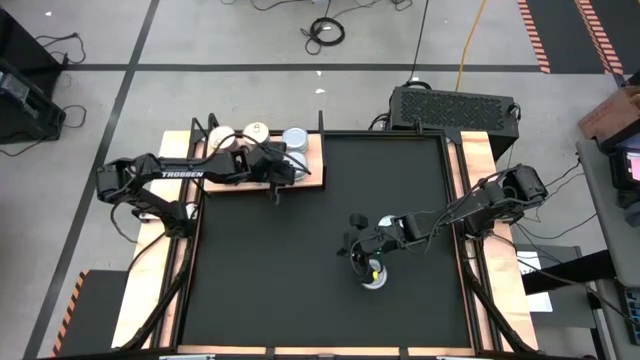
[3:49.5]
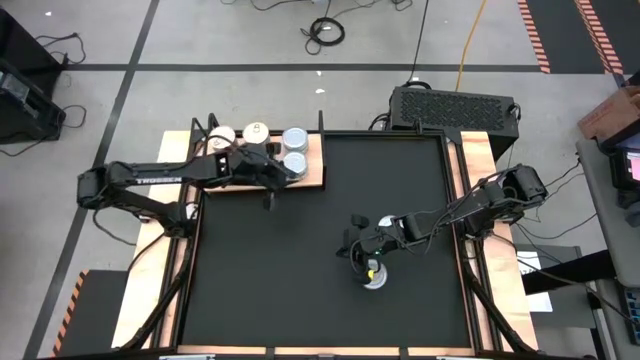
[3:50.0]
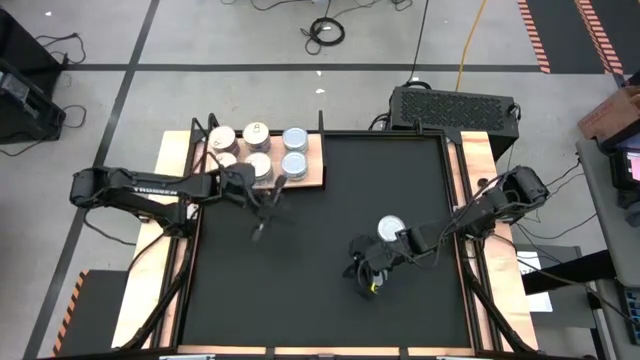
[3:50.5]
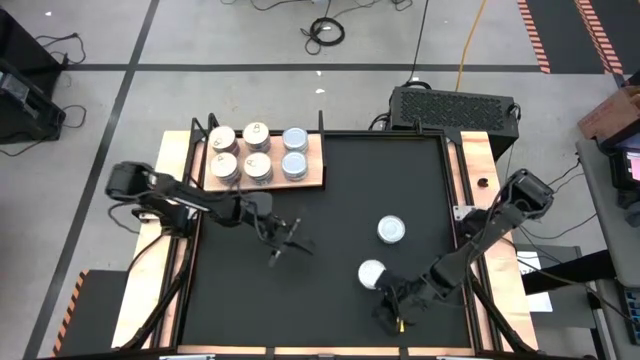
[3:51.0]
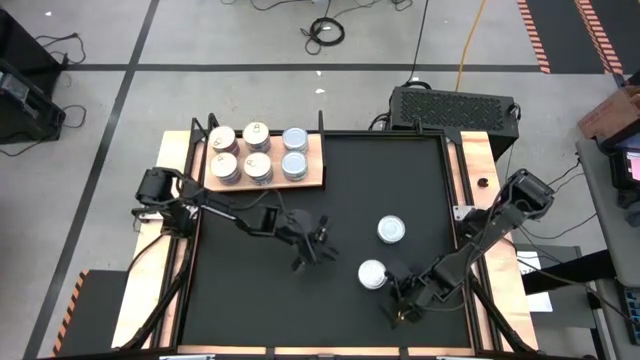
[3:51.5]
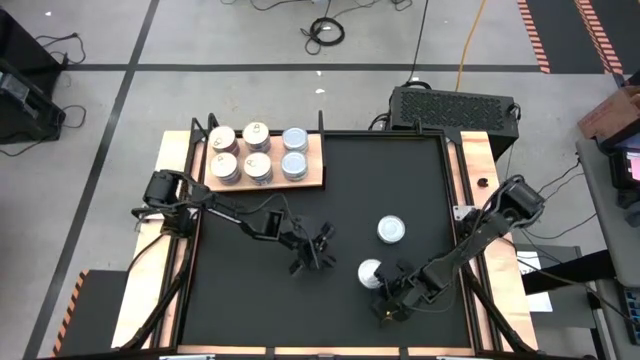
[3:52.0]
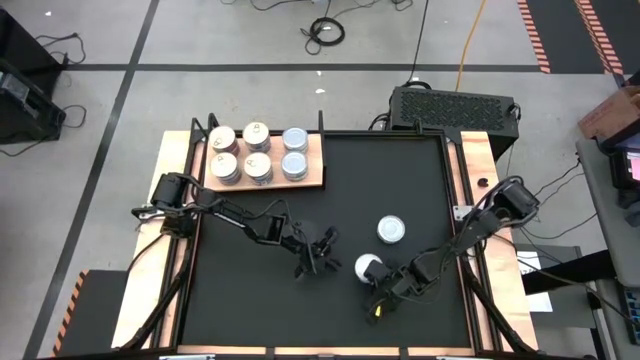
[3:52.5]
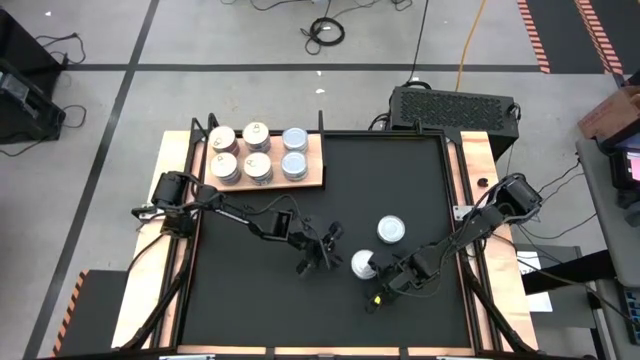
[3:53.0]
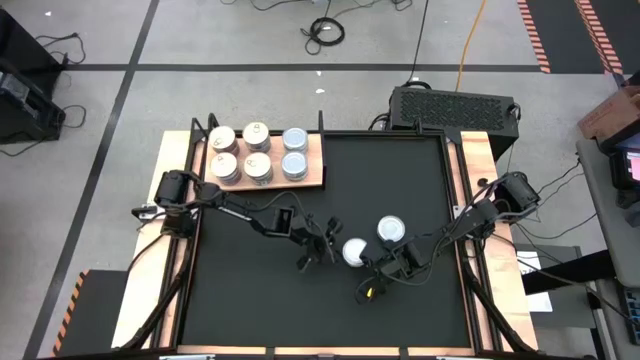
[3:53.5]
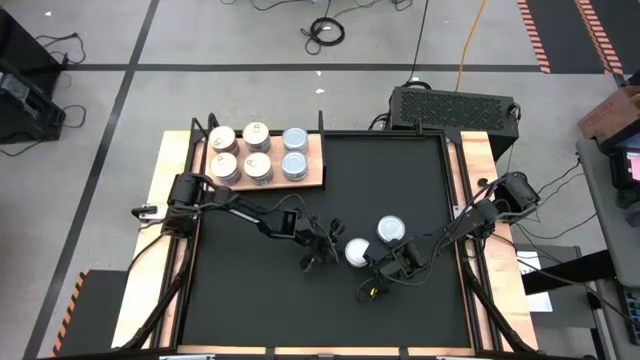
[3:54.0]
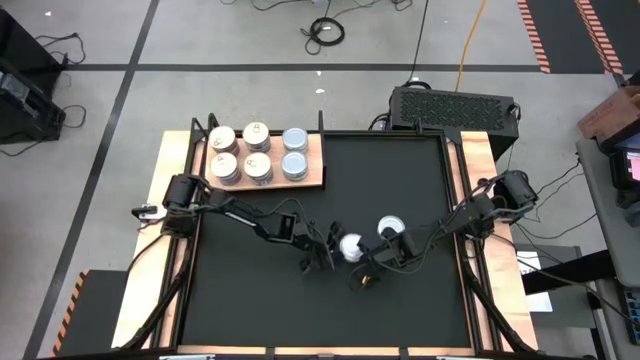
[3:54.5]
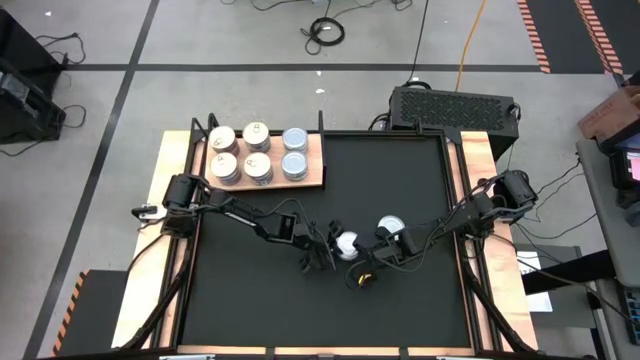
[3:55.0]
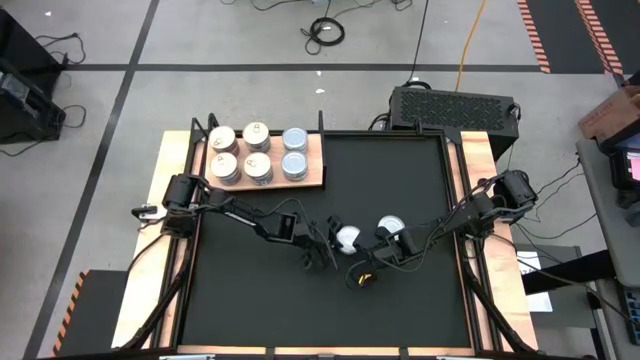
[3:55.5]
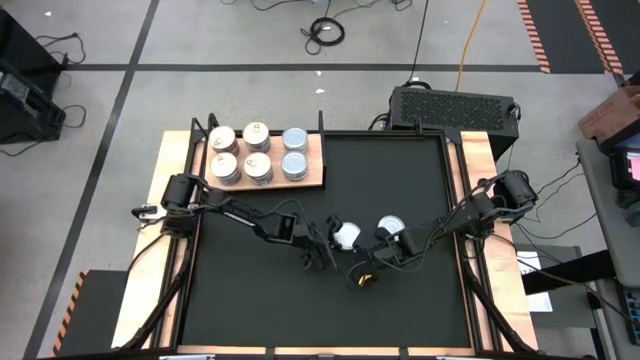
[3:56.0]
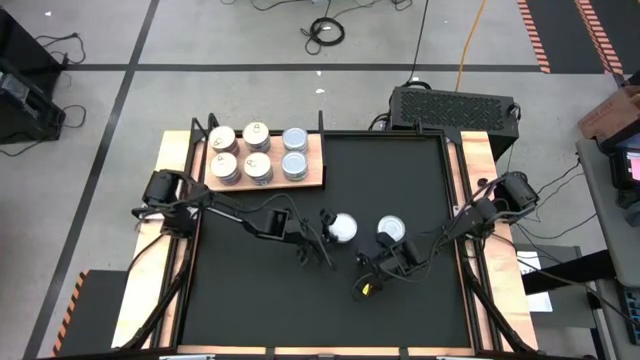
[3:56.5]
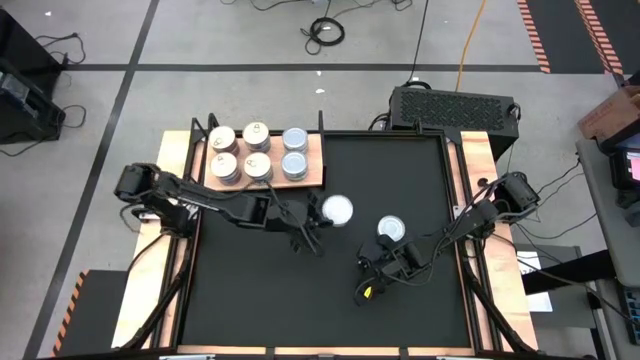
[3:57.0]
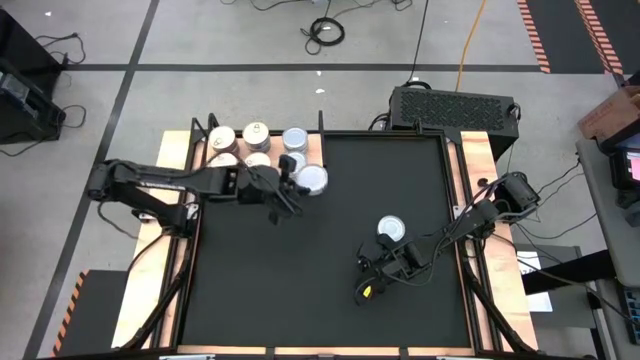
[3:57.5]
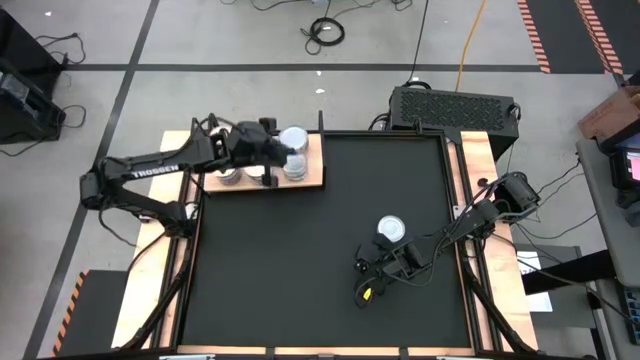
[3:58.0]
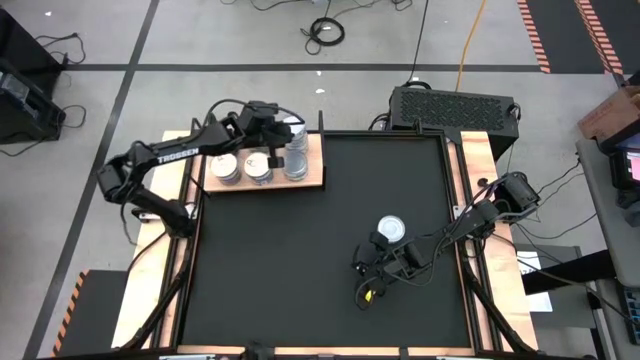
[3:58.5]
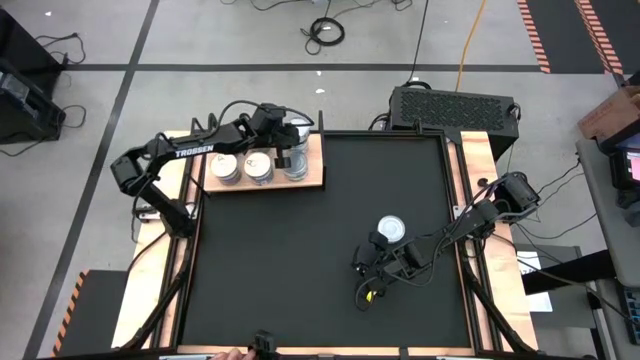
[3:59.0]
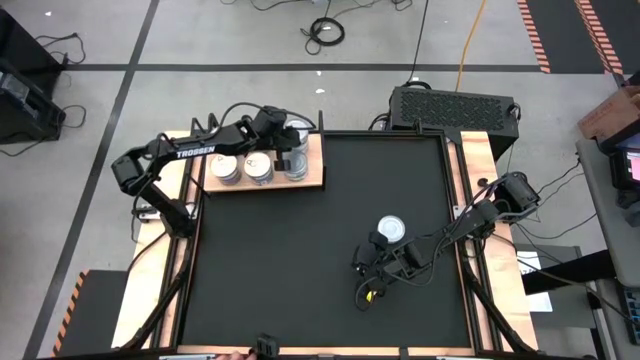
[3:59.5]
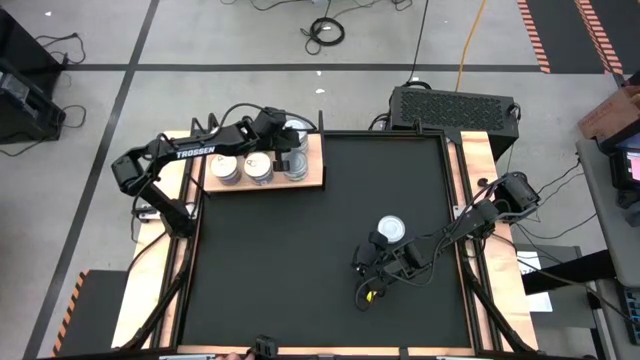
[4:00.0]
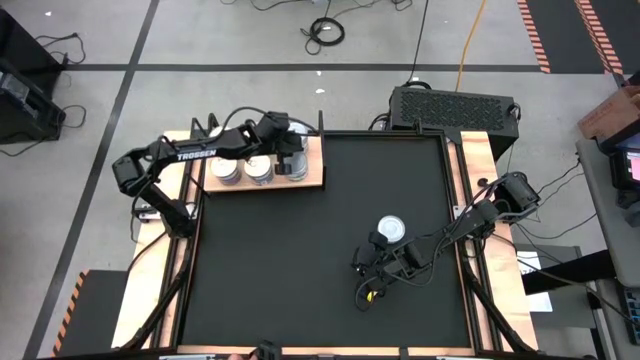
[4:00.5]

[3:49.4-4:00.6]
Task: Stack canned seafood by type on shelf
Stack the bottom green tuna can on the top green tuna can on the shelf

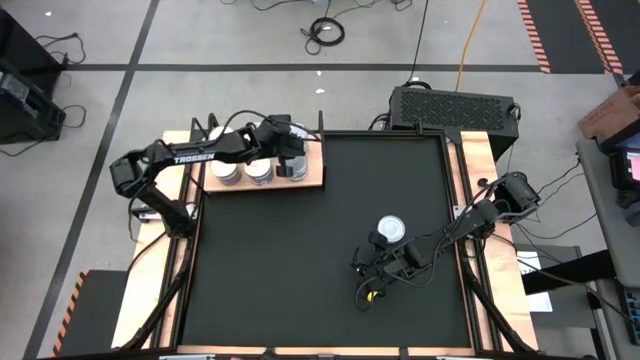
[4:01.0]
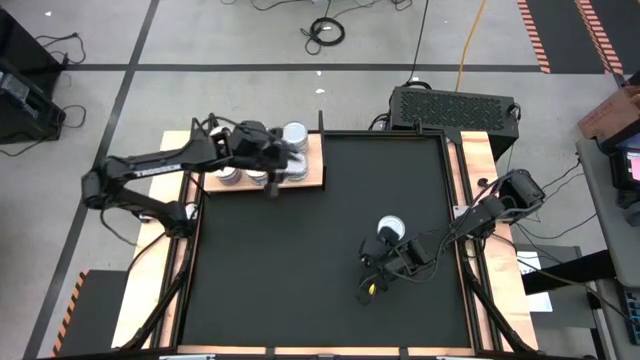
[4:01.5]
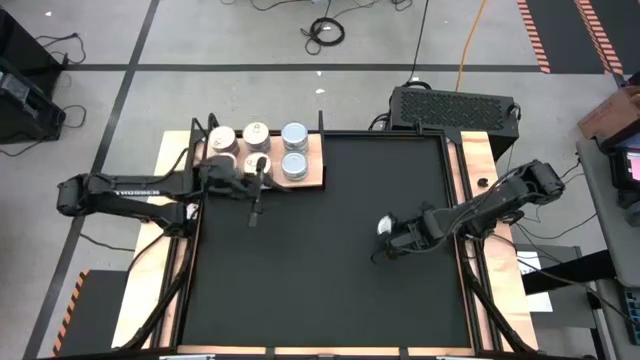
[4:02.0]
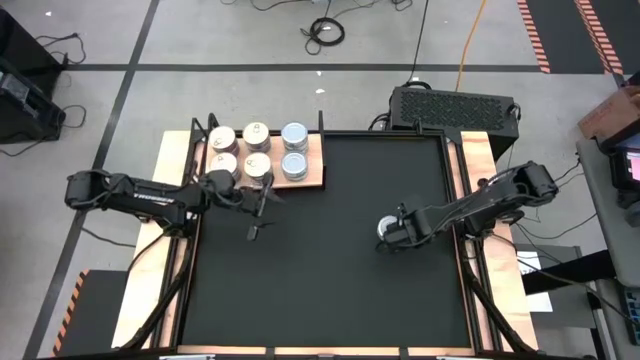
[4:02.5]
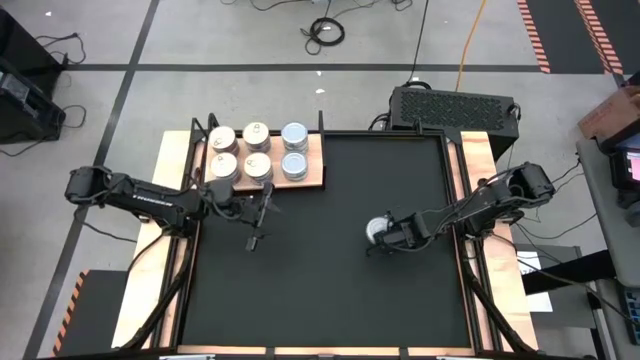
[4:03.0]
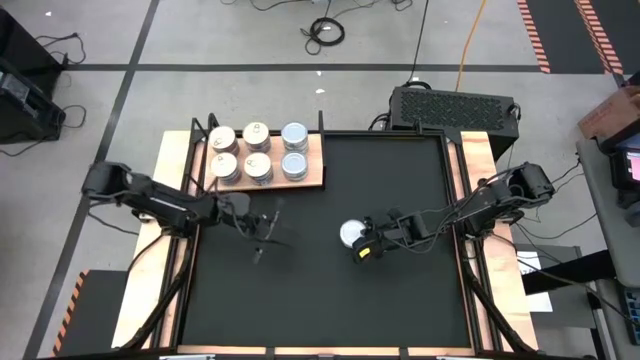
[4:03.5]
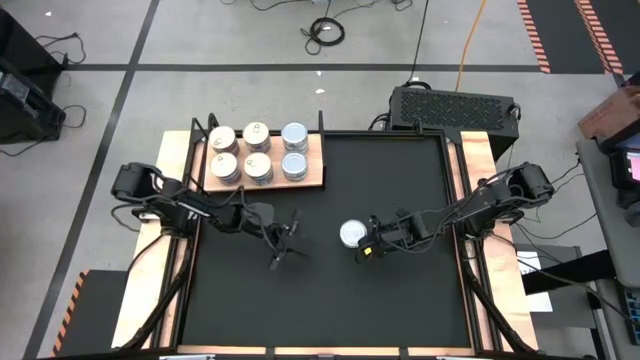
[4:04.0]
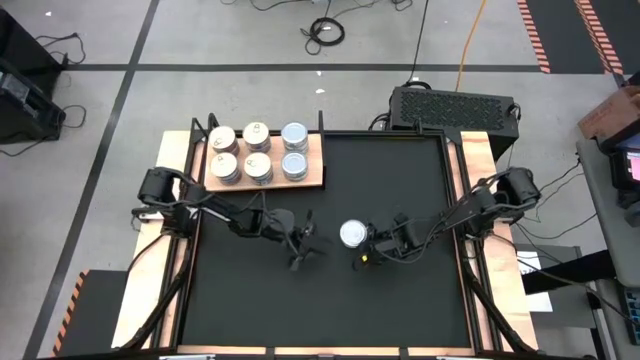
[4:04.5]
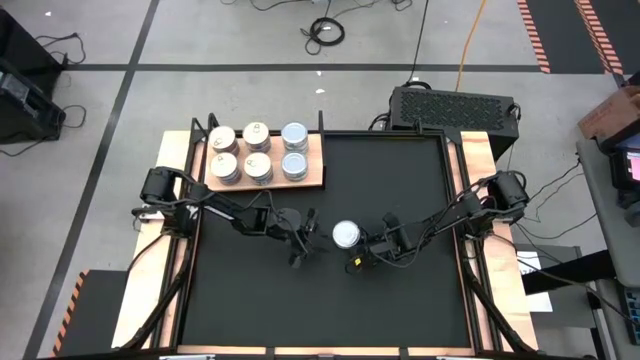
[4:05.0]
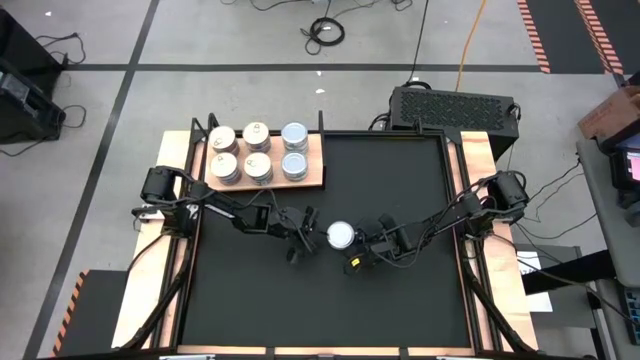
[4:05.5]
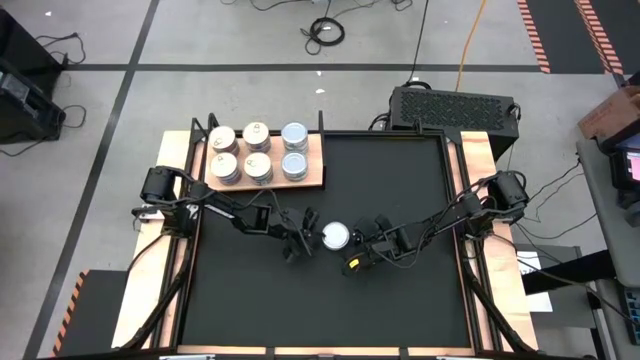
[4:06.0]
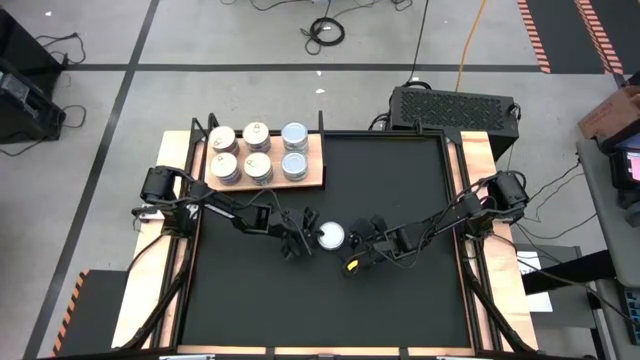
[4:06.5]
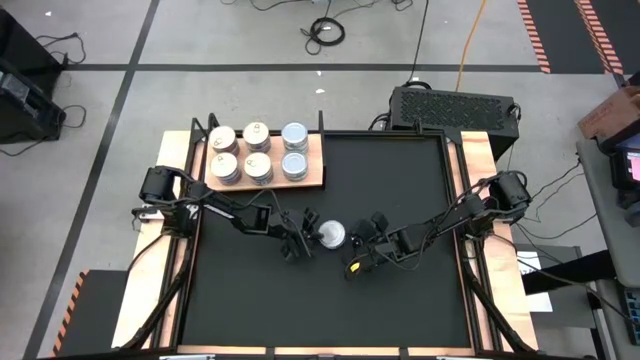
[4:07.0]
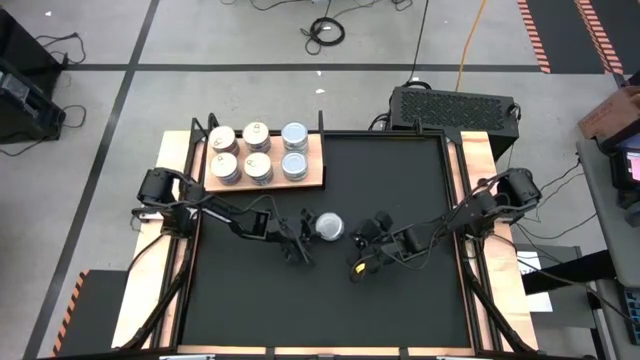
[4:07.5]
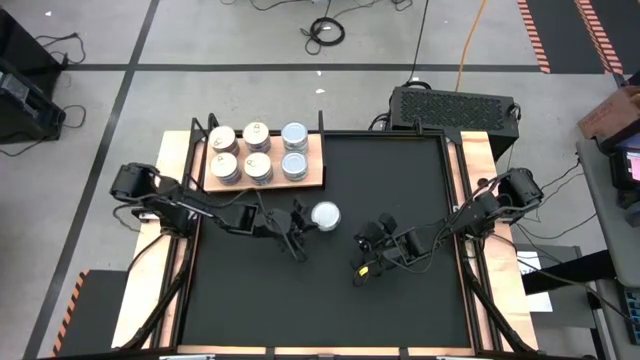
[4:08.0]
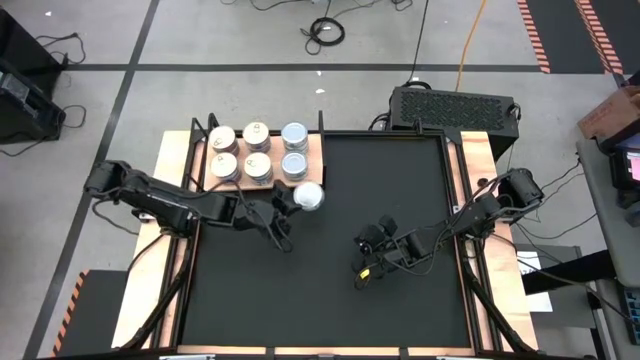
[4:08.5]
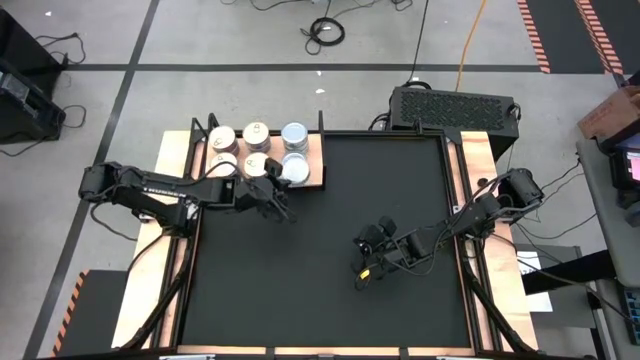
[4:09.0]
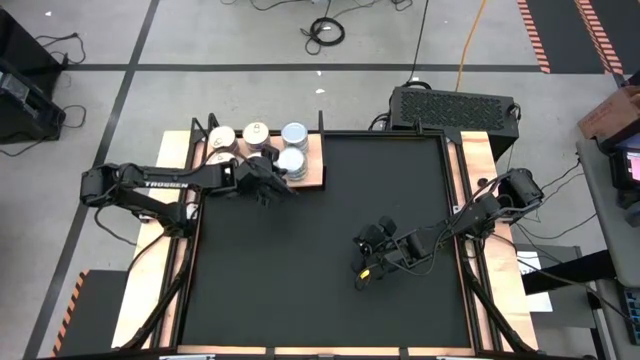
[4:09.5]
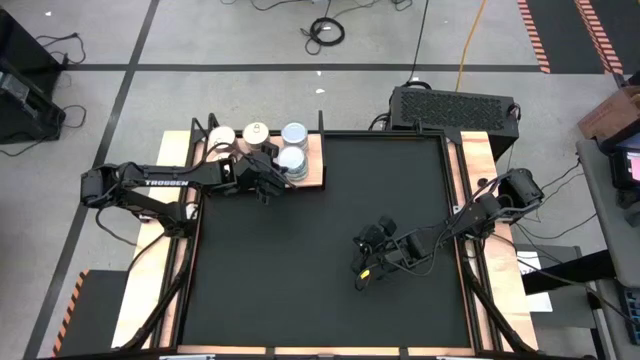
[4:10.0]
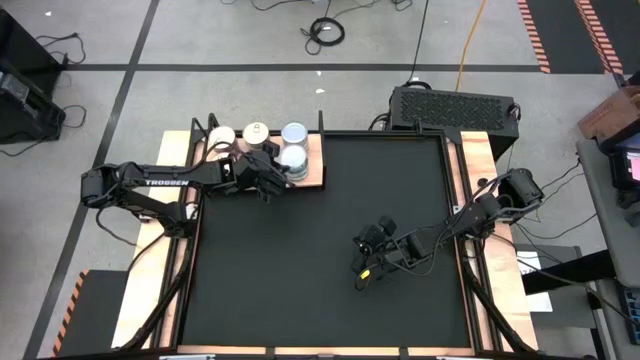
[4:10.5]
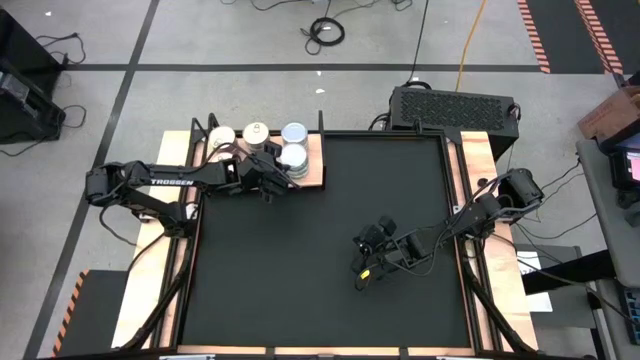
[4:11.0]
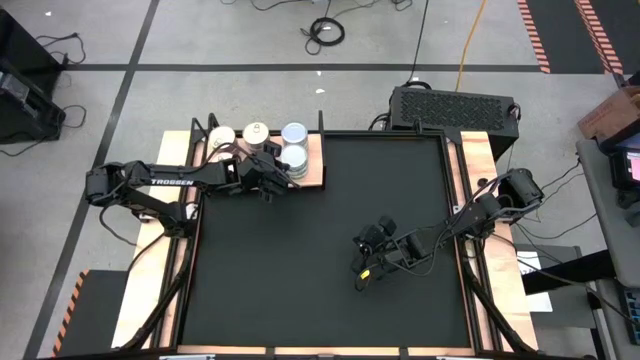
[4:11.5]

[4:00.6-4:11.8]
Stack the green tuna can on the bottom green tuna can on the shelf
